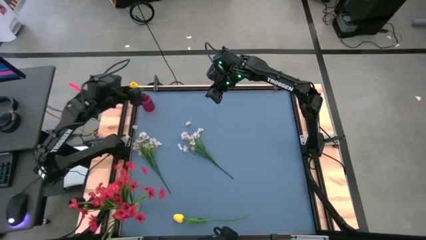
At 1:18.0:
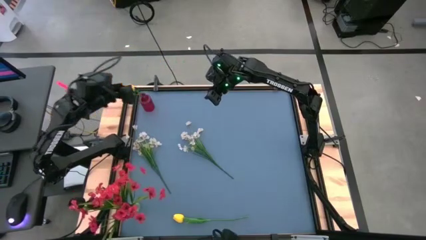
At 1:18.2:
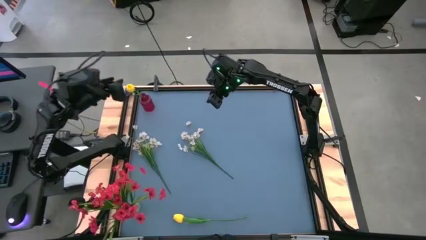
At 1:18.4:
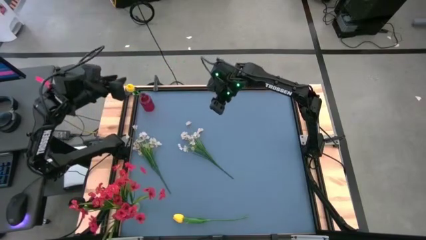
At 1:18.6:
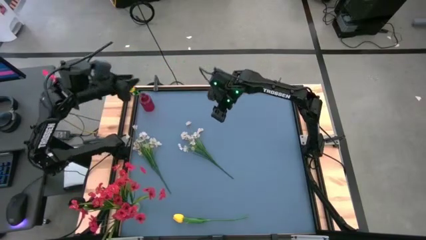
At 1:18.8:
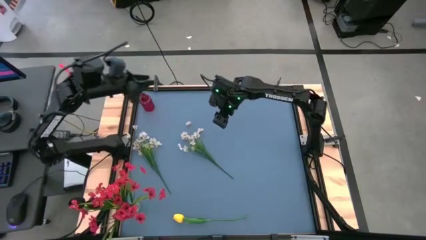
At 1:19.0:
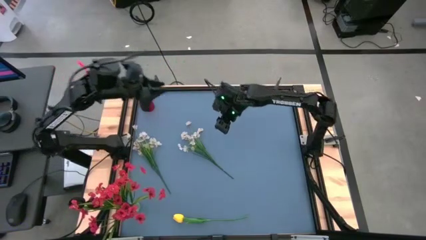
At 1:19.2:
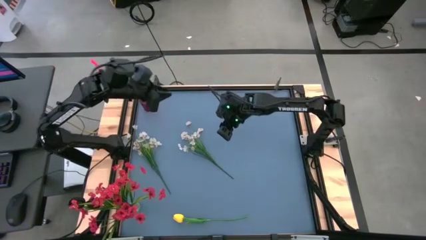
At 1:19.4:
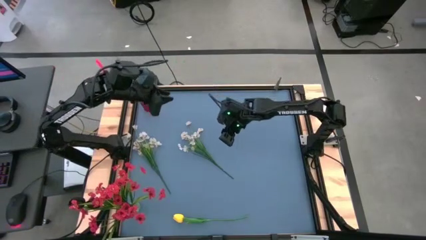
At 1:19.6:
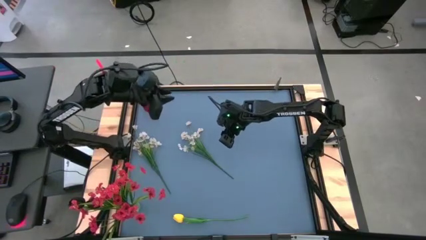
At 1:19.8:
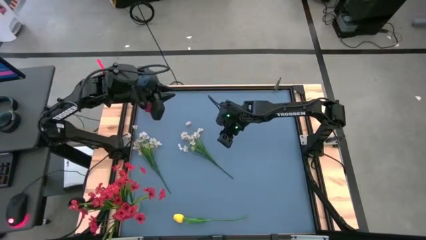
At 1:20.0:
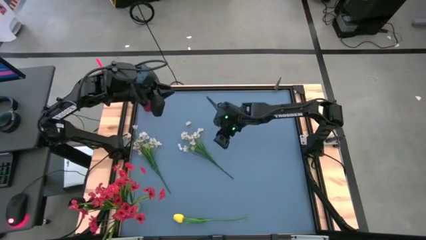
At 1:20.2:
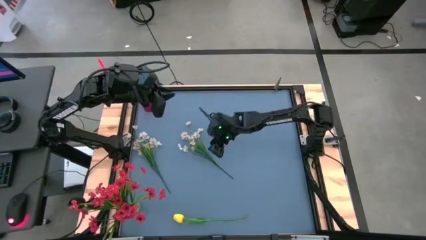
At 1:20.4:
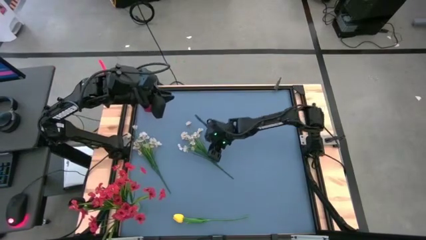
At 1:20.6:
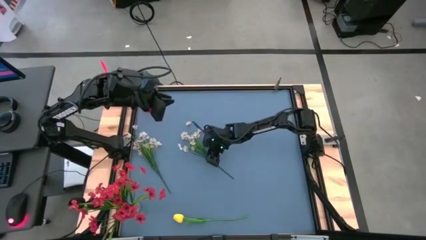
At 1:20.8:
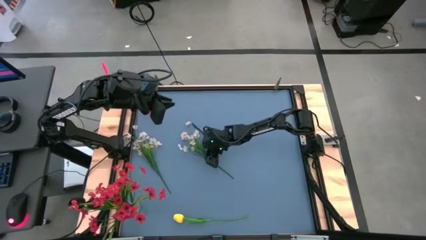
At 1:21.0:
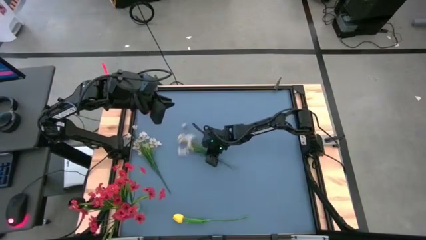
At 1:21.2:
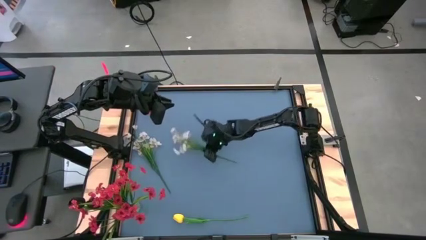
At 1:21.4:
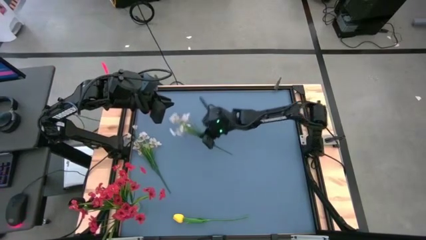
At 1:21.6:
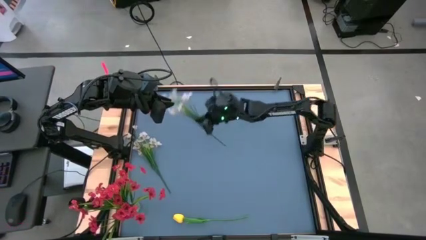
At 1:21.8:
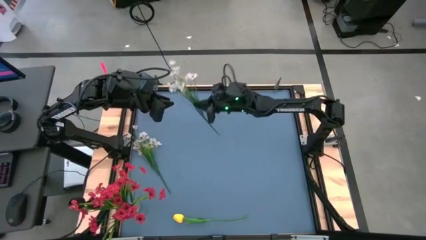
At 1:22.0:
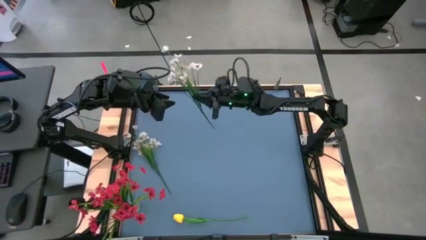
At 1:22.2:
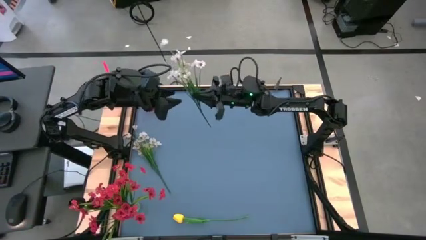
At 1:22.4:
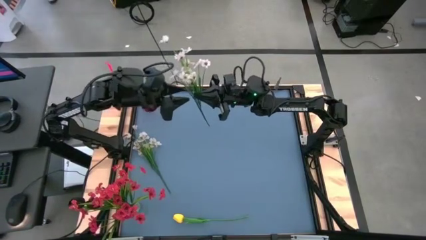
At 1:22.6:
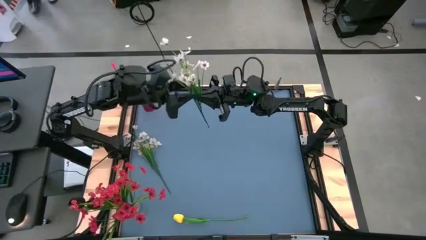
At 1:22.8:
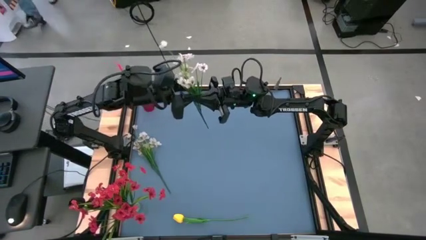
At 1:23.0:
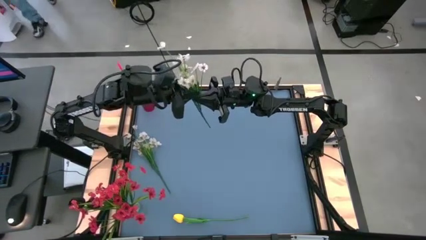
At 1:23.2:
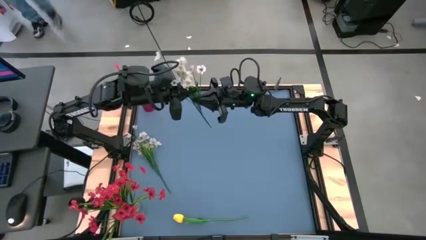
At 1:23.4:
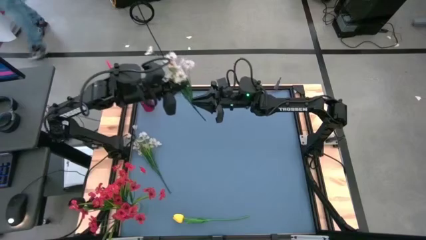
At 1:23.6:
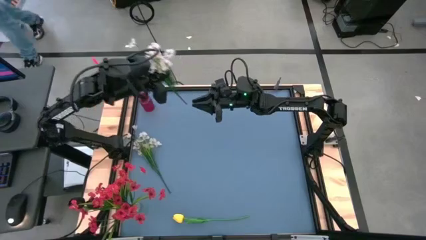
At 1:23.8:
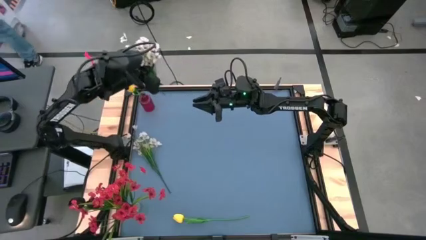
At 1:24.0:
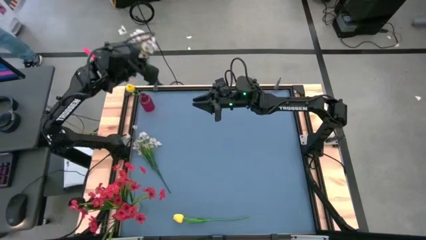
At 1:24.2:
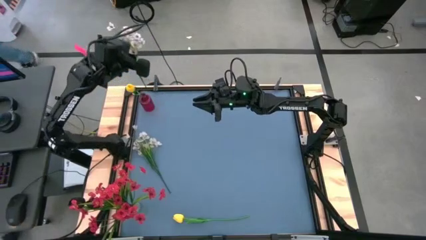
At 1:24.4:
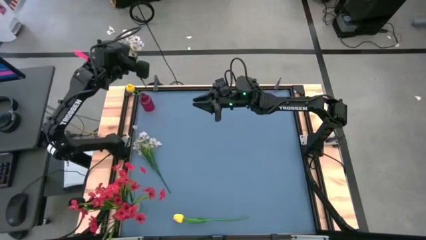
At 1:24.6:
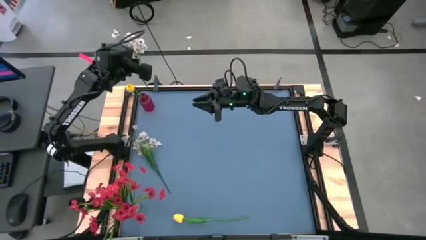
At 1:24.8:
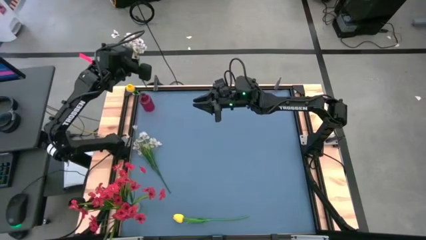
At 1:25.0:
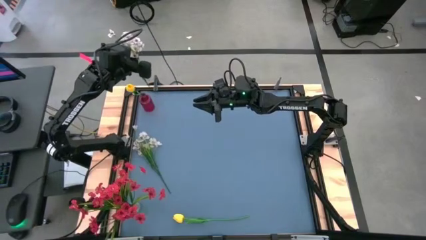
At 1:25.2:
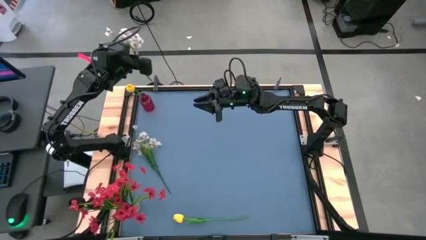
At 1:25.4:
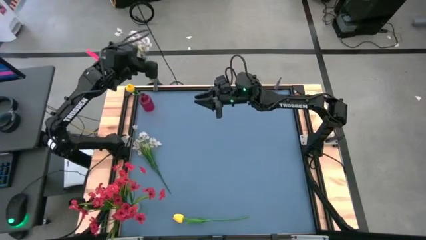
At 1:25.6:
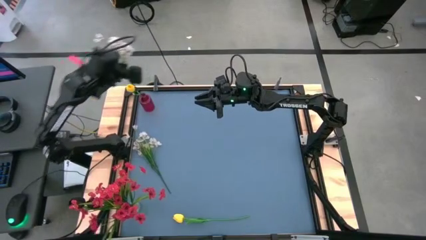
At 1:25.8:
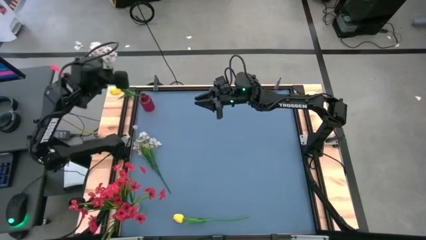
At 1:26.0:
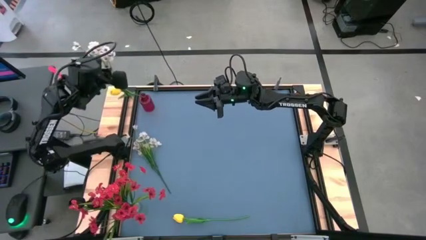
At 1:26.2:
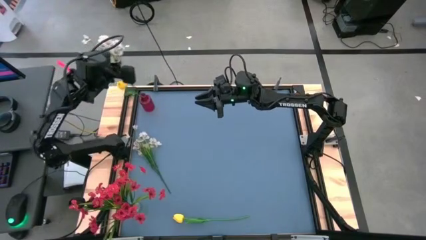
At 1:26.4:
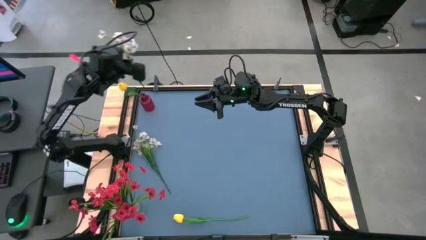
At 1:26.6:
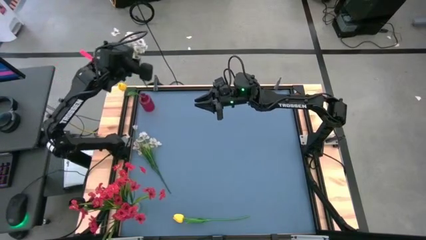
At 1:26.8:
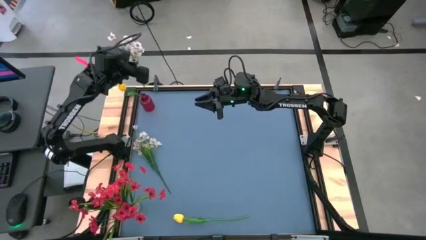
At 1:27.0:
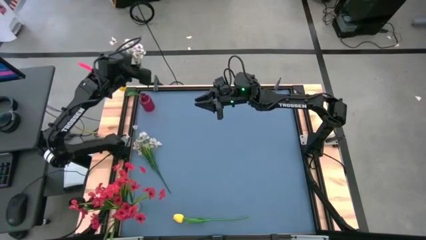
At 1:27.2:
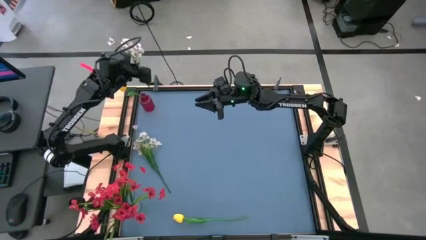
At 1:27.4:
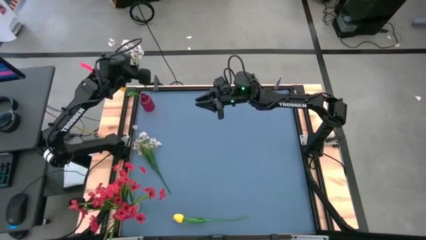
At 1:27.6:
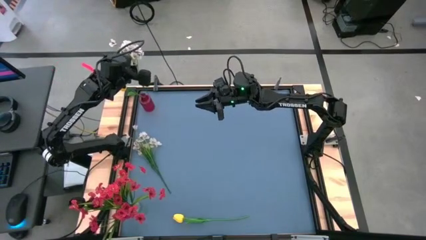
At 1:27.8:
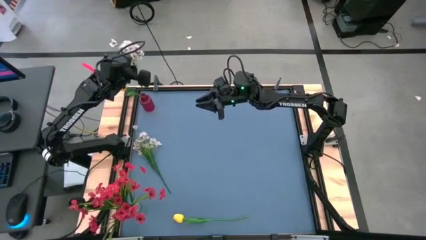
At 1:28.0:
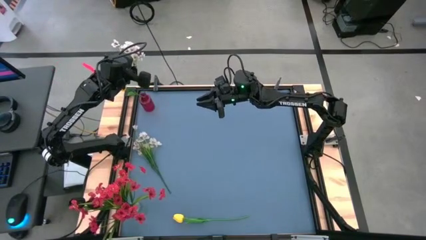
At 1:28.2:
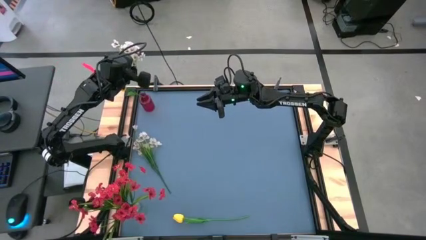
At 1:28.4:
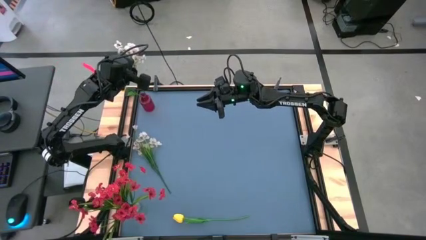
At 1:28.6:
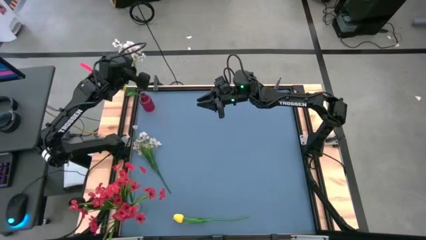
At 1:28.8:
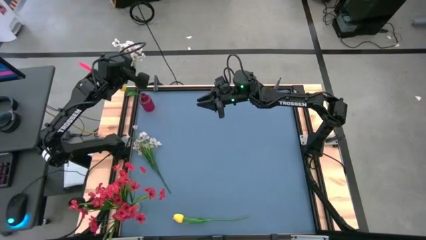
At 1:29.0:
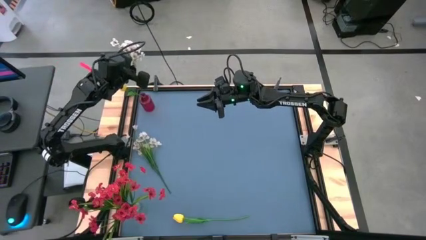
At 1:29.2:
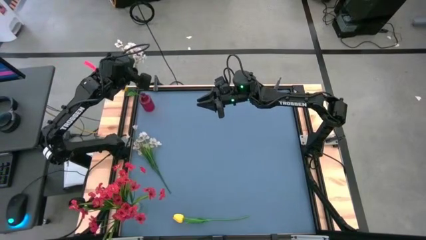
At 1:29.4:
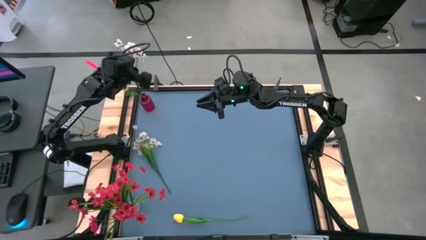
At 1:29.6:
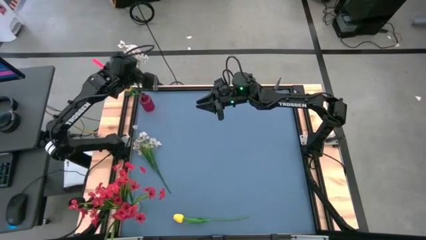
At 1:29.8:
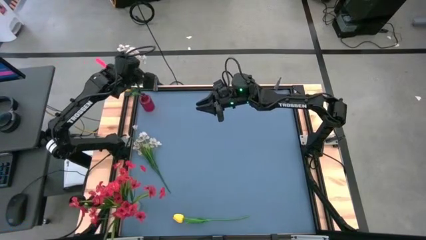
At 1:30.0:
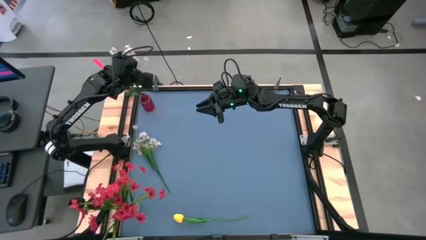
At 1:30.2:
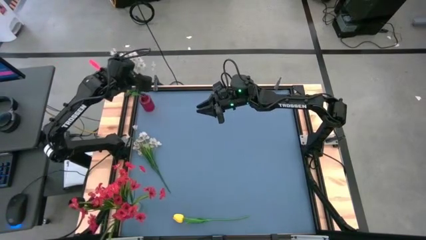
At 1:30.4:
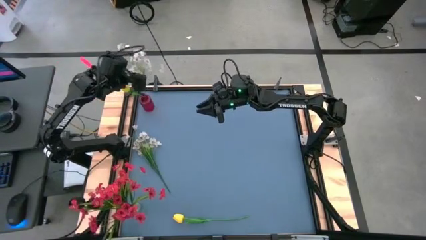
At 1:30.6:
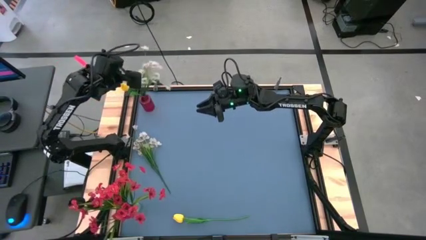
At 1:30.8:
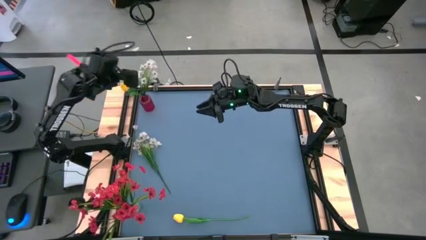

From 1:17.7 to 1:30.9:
Task: Sort flowers into vase by color
Put the right white flowers into the pink vase
